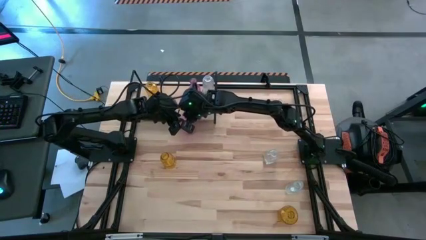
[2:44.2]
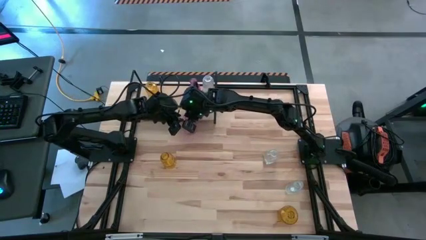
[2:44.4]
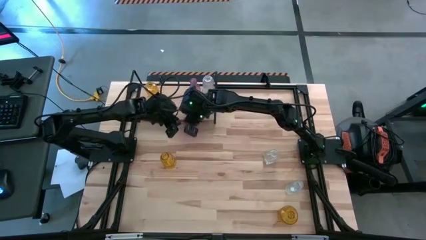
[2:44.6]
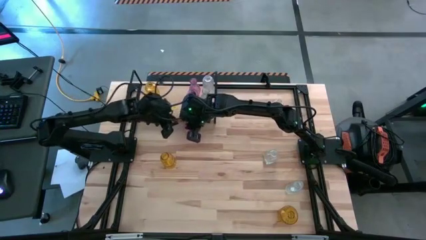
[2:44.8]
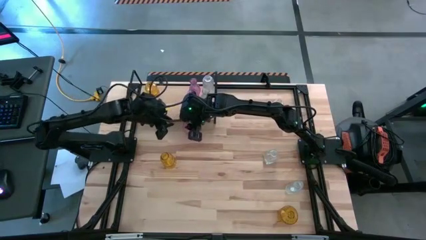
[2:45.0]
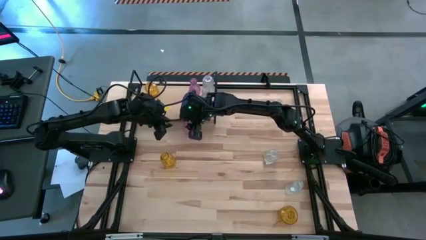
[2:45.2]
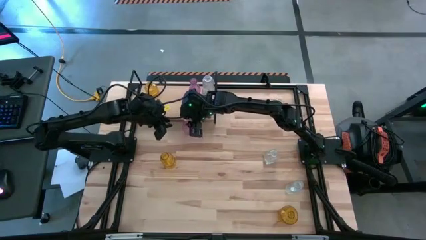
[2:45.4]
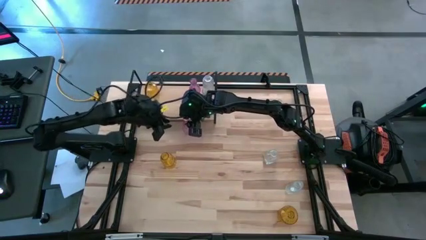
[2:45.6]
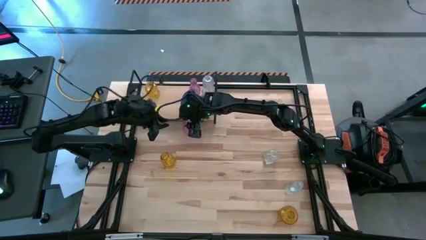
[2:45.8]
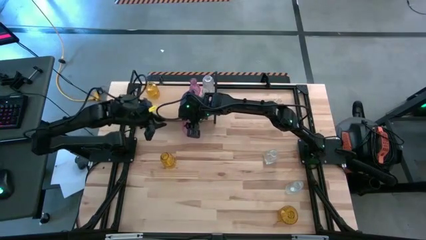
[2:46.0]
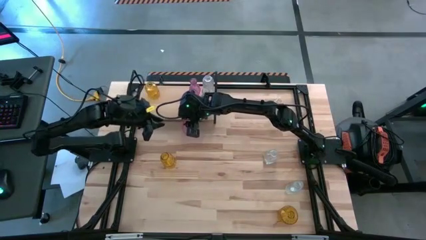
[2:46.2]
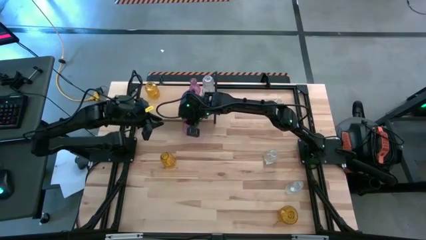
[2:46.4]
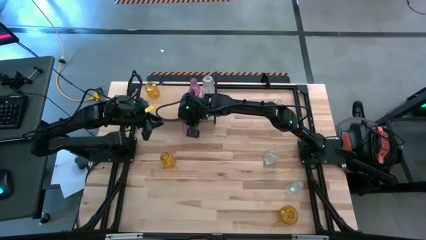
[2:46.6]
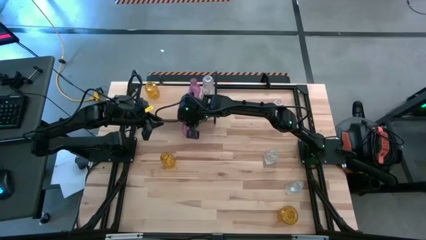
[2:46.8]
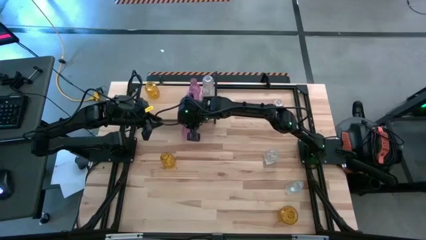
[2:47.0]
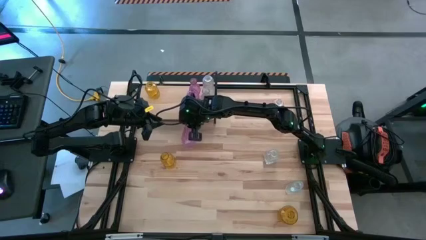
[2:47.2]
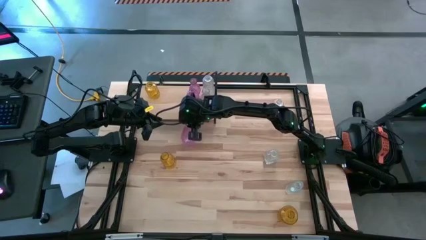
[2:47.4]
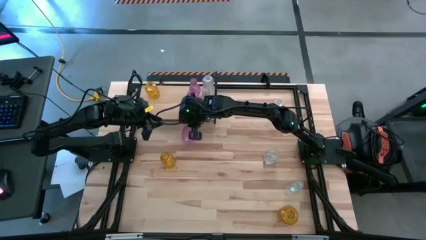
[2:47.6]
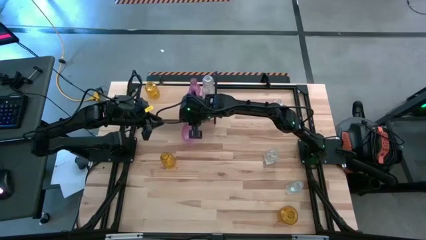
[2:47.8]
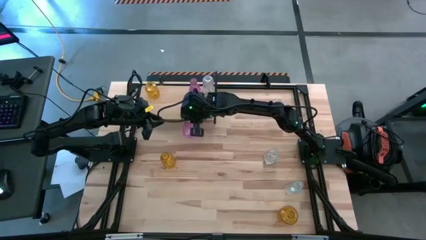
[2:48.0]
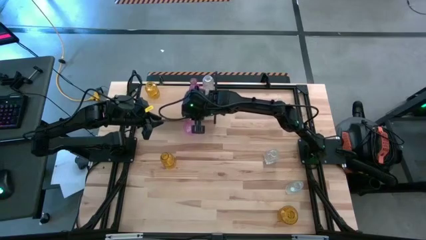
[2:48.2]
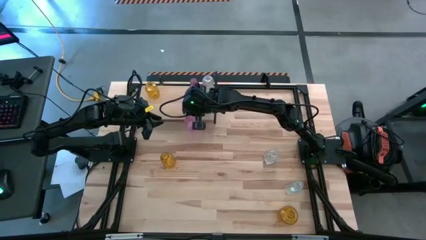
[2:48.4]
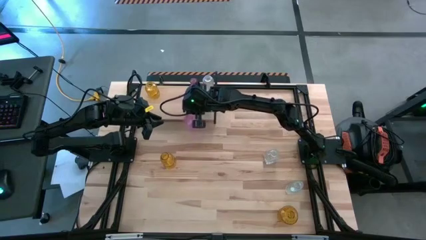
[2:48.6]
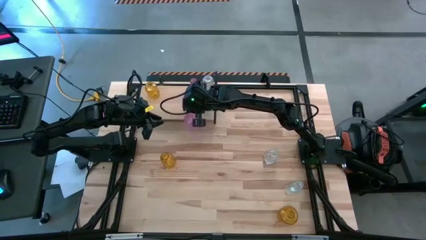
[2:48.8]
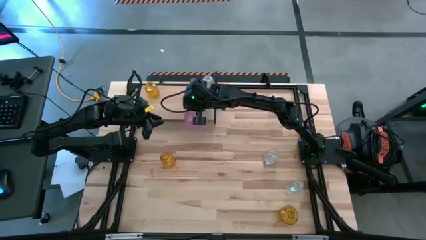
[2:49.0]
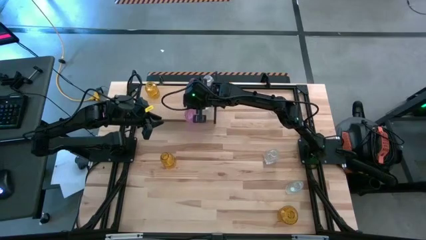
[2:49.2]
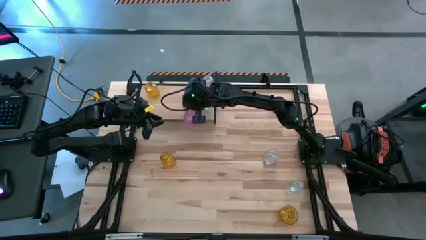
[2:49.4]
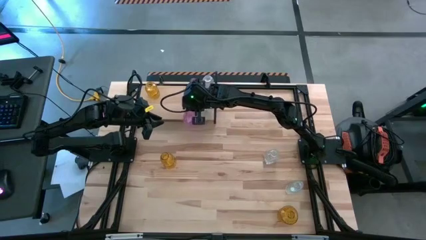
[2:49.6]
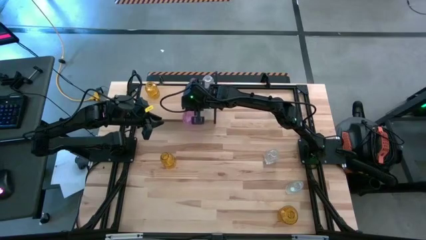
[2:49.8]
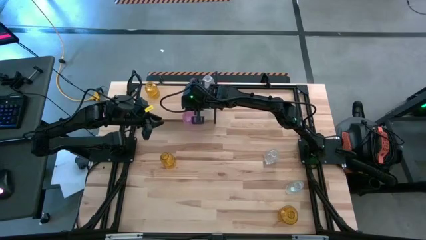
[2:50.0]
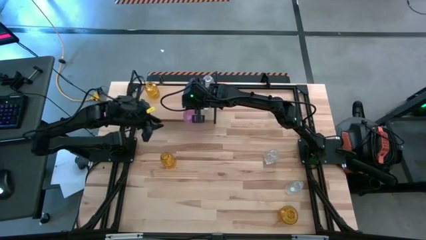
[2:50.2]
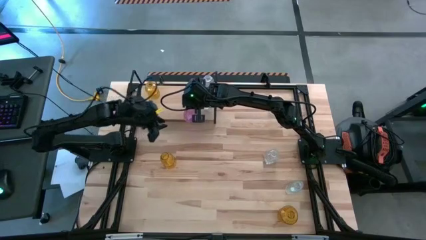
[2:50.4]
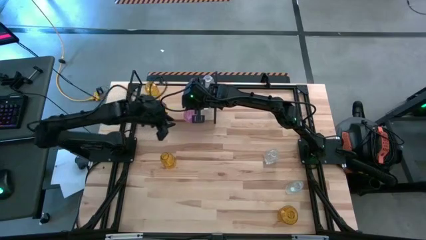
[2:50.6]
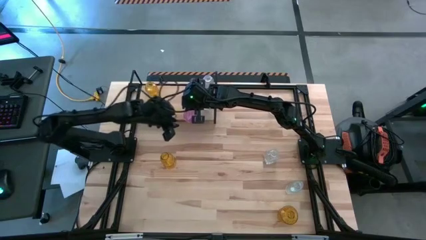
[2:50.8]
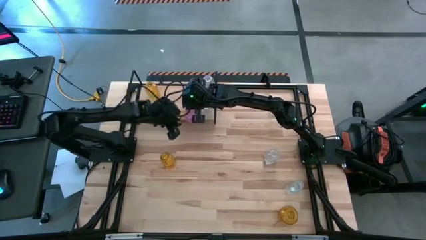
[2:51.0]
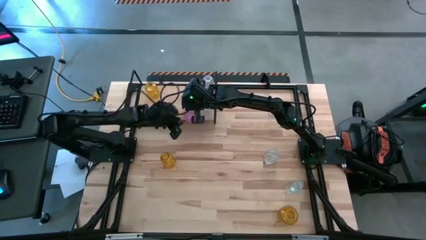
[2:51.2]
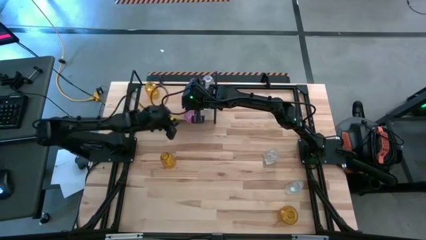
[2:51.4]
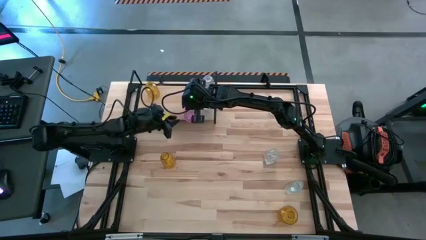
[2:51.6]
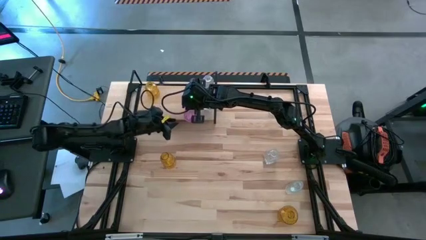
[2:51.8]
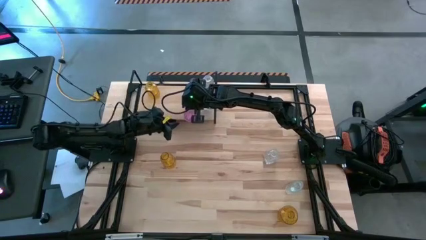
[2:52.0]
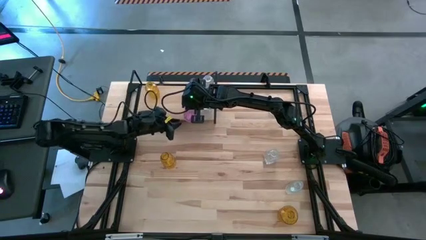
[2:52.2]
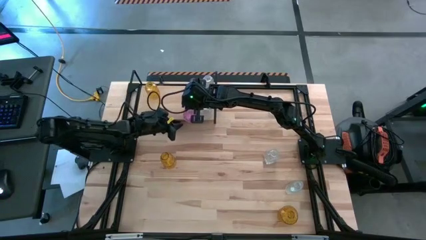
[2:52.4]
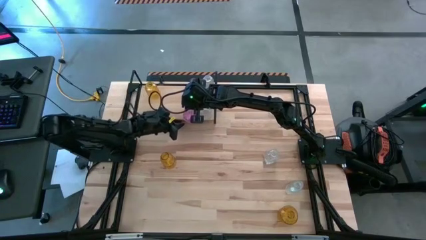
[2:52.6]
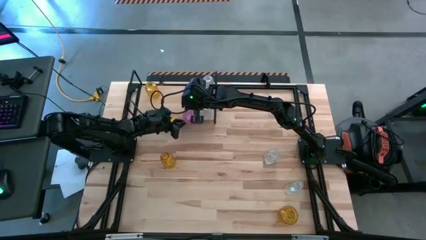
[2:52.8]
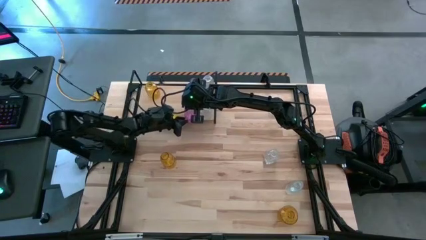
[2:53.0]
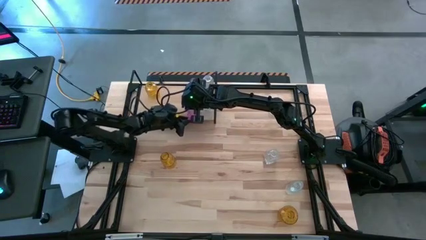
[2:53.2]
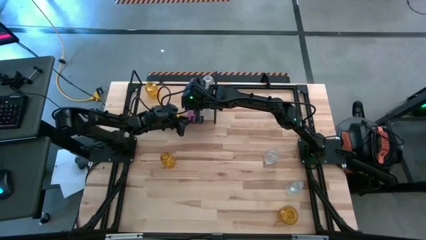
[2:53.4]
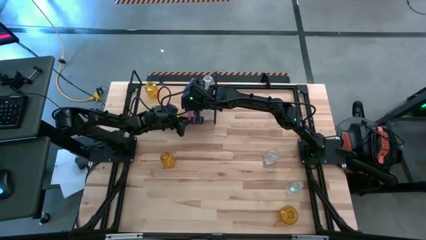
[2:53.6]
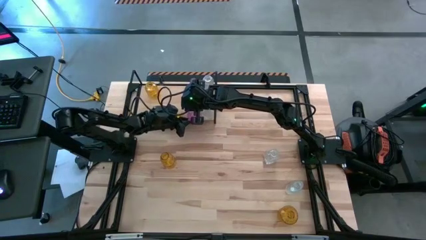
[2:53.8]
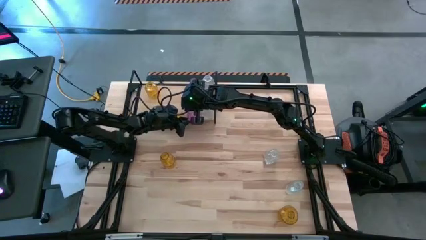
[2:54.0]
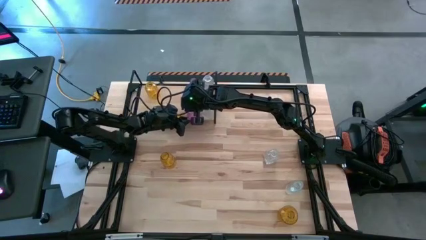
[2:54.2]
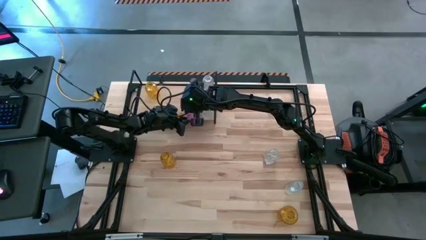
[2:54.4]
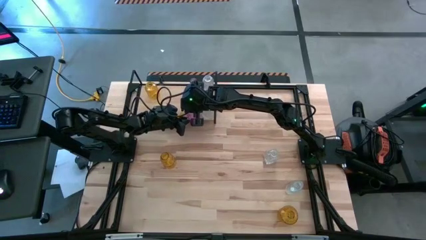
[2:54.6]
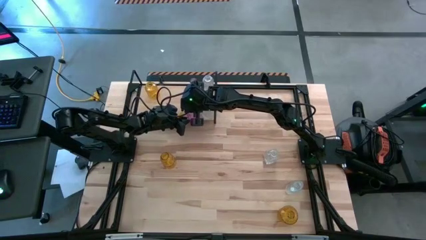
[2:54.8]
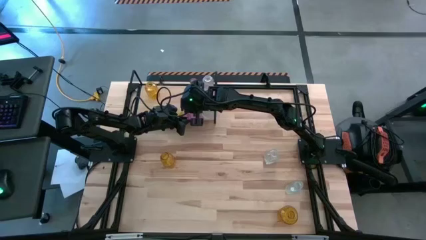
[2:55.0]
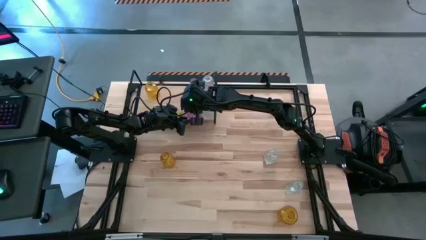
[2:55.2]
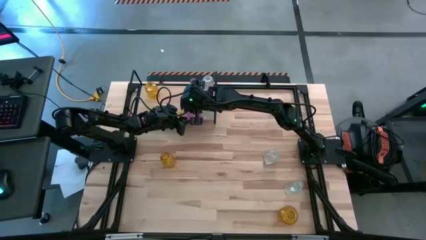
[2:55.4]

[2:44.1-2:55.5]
Task: sort vases onto shelf
Put the pink vase on the shelf aligned with the other pink vases

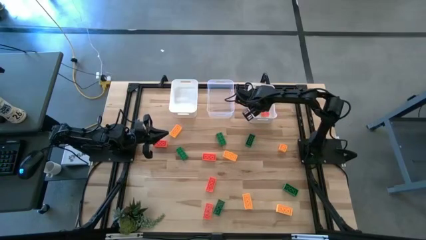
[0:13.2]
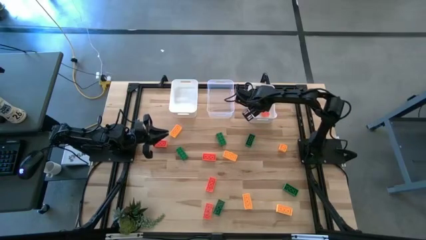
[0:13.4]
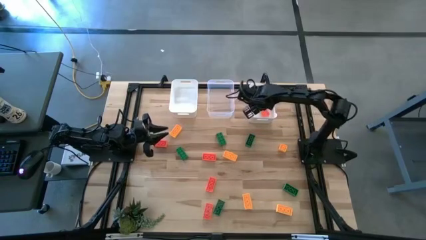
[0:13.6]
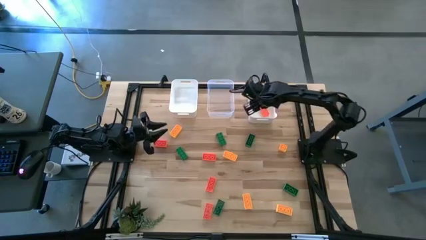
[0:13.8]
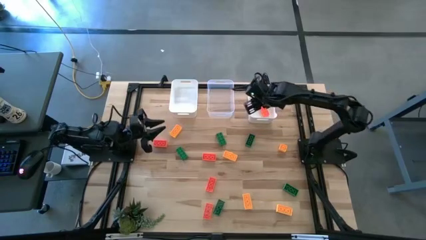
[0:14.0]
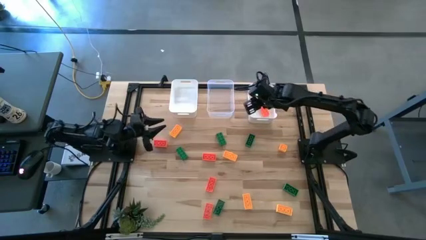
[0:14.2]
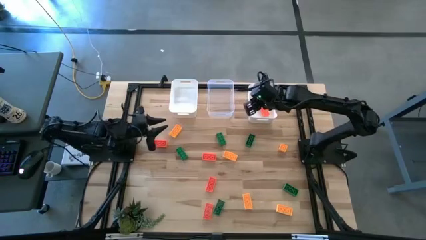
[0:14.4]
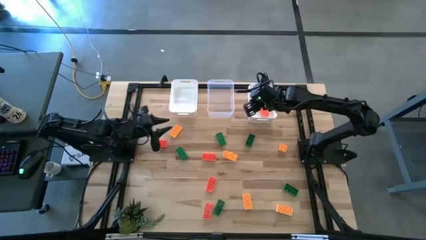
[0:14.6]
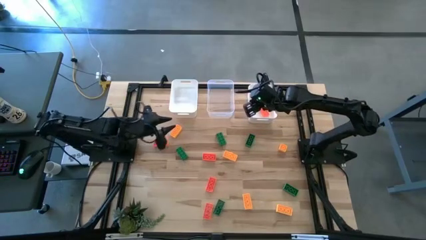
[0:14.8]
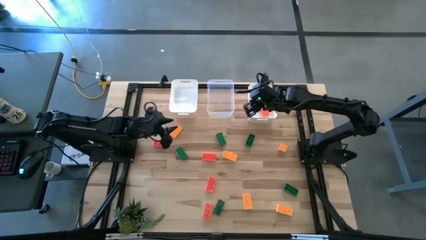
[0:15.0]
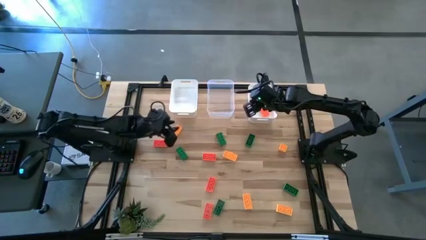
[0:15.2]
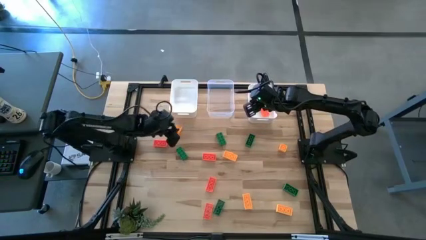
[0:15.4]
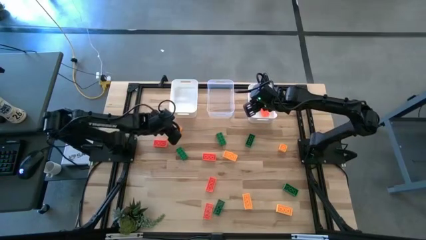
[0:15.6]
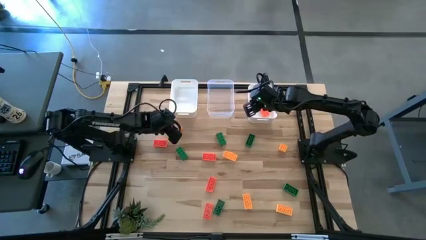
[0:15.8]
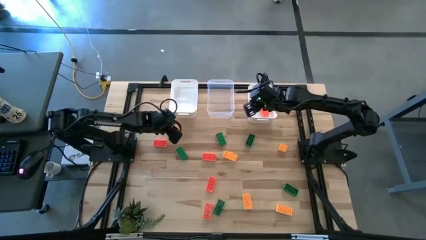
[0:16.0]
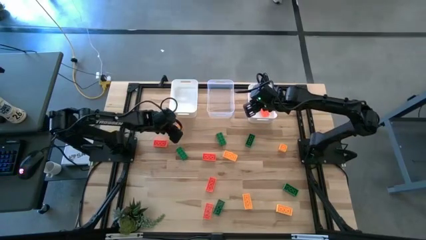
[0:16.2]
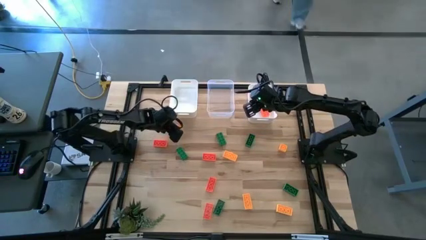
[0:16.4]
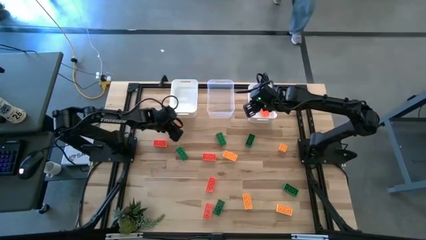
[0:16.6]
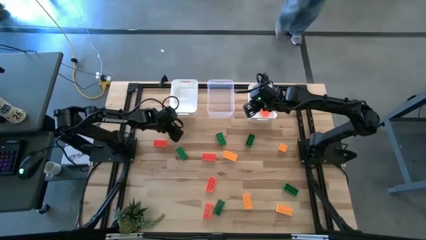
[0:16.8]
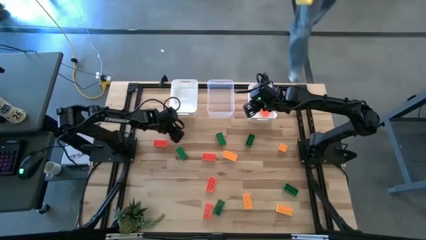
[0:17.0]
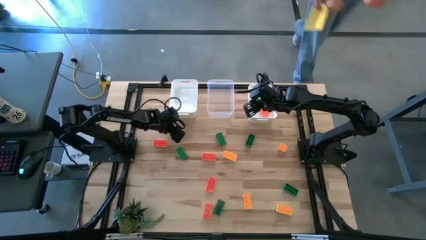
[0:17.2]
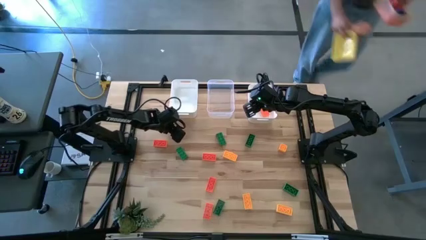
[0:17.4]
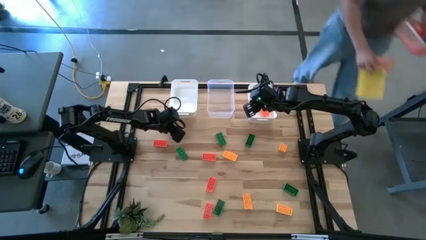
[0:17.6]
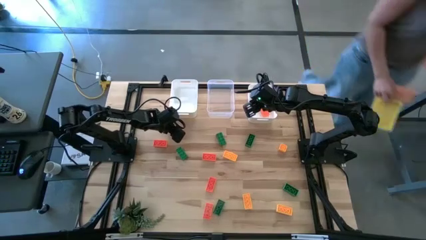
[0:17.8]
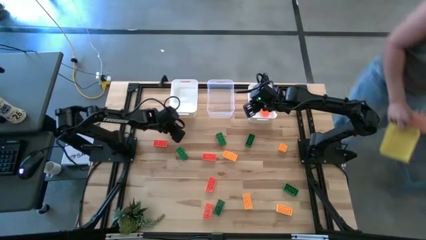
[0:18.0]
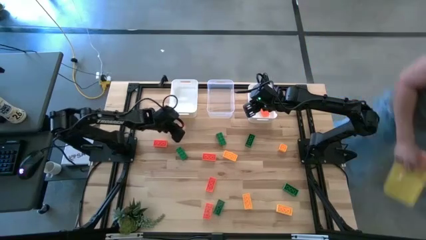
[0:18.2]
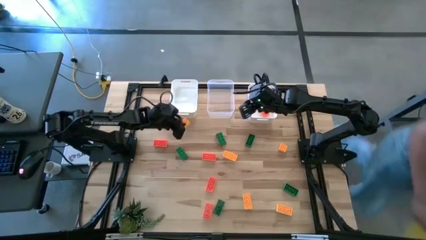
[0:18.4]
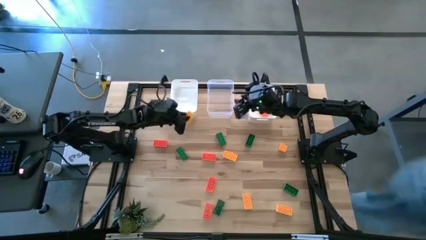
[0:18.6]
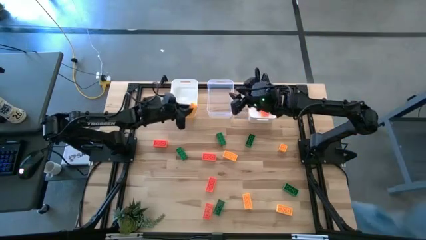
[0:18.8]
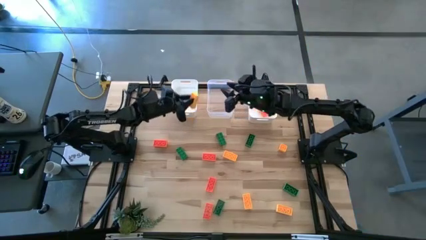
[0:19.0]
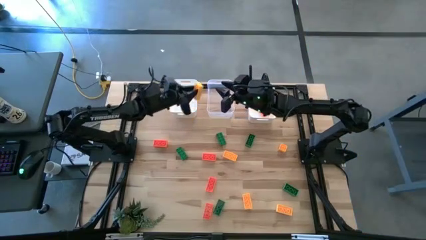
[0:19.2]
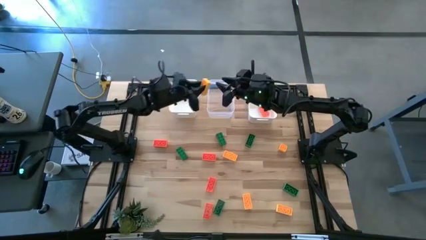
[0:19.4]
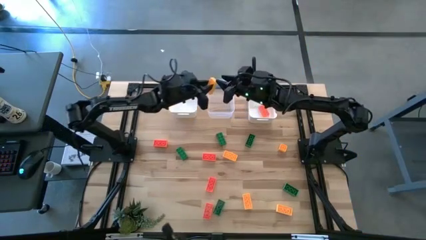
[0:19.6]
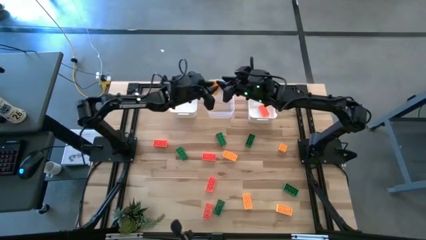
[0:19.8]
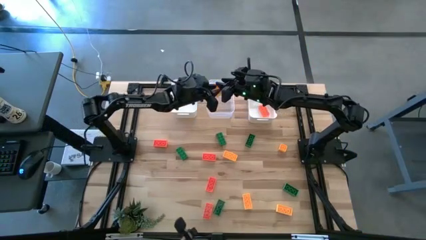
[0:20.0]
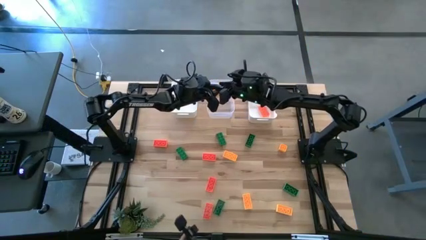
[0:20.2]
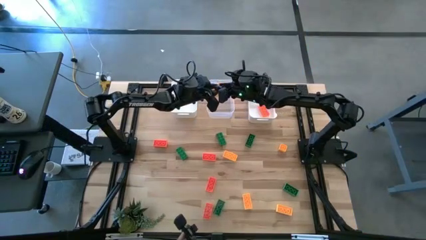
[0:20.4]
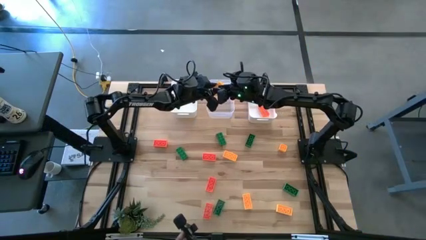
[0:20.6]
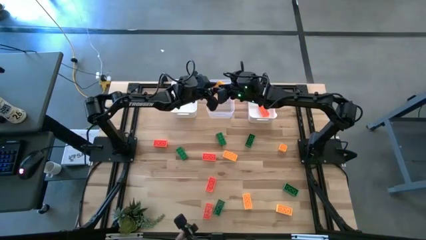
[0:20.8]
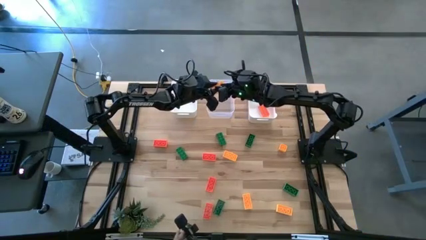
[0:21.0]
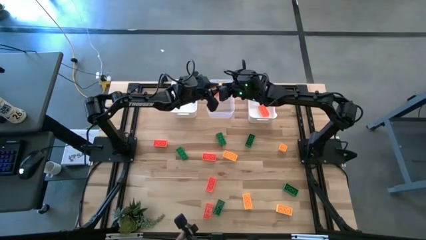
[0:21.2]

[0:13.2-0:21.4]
Task: Sort & place blocks by color
Put the yellow game piece into the transparent bin
